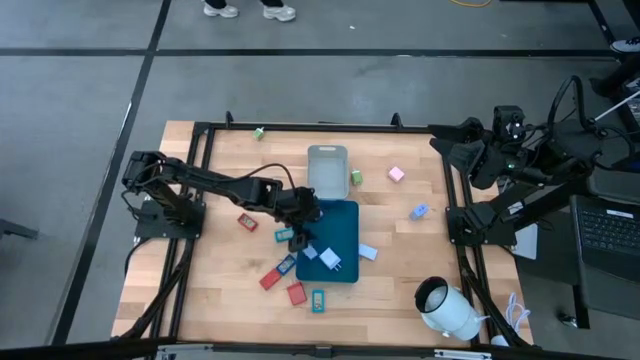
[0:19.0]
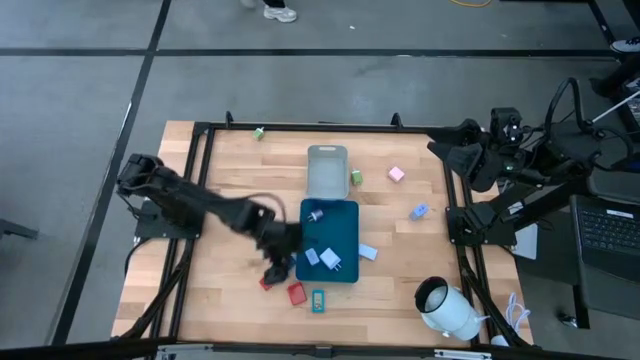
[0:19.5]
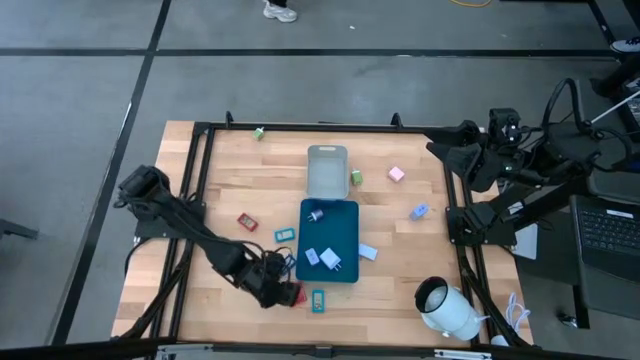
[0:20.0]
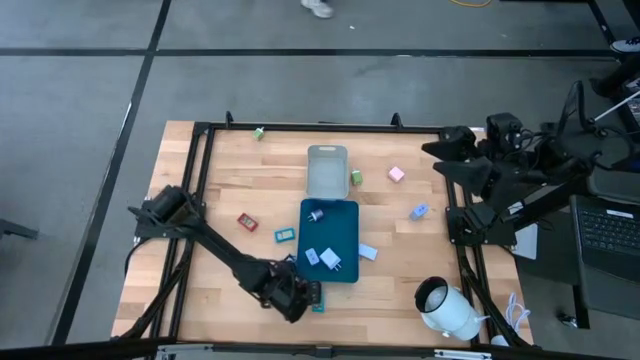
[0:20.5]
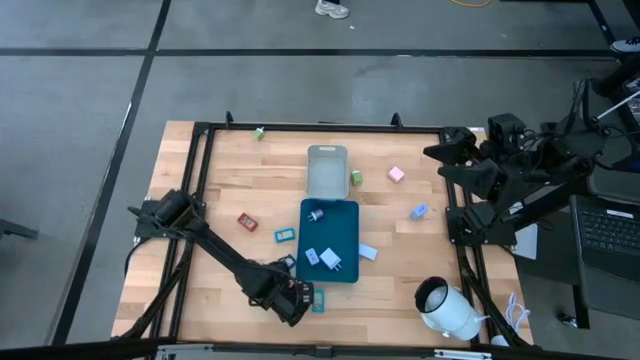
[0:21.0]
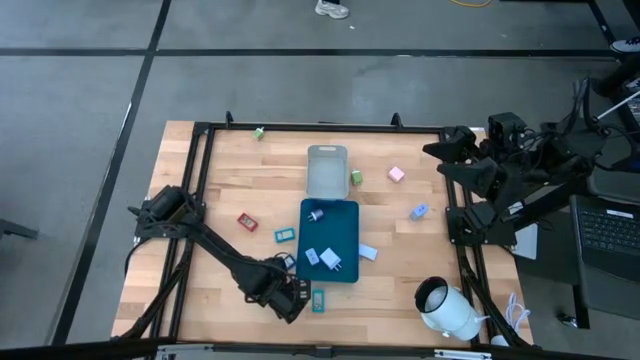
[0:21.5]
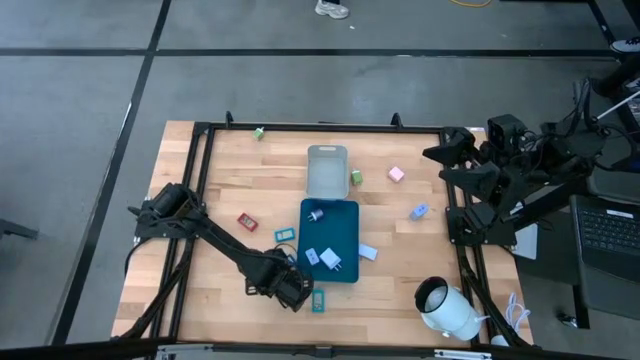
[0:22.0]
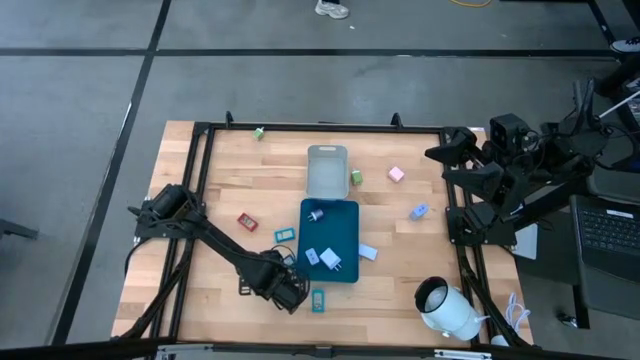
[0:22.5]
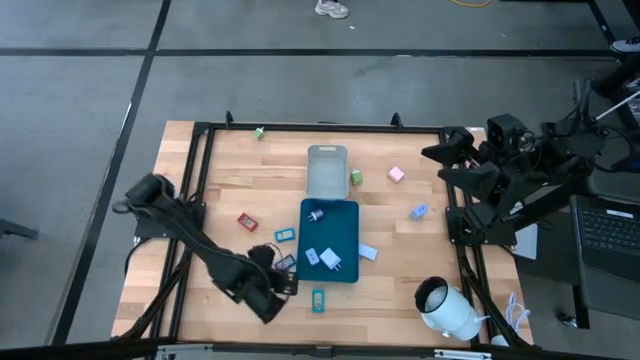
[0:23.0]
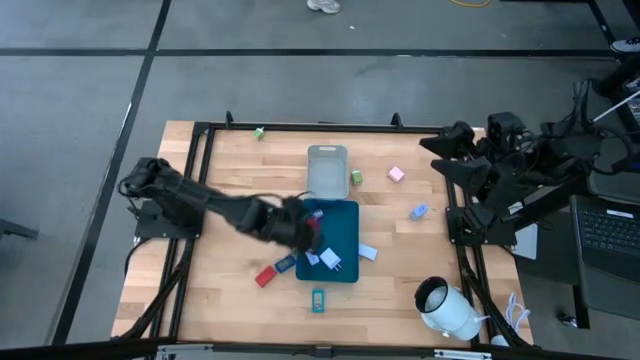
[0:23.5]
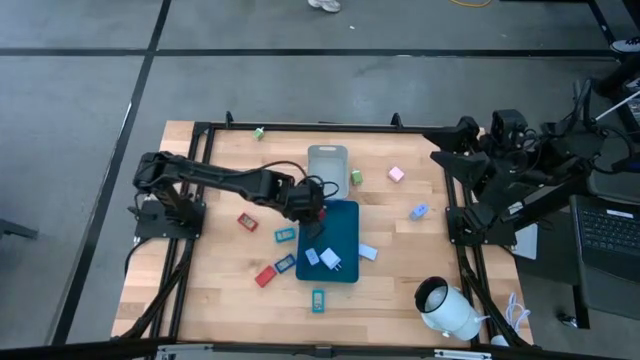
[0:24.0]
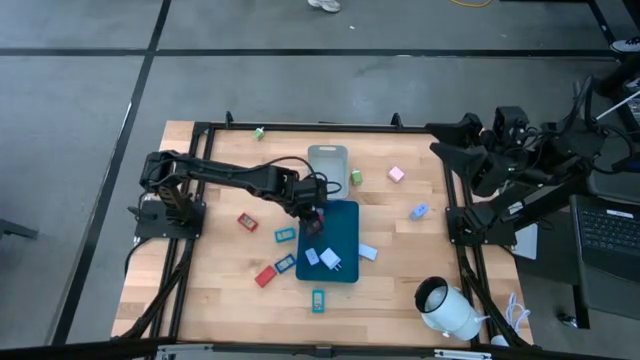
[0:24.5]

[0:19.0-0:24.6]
Task: Pick & Place Office items
Put the orange charger adapter into the blue bin

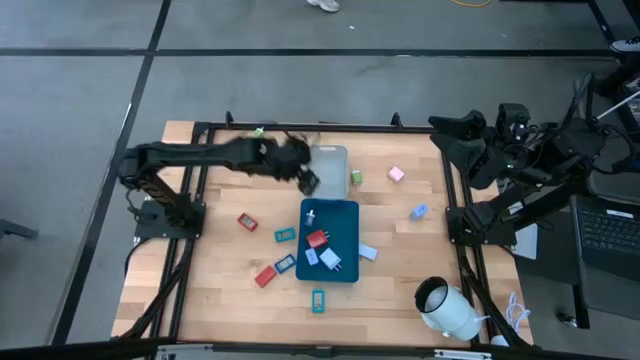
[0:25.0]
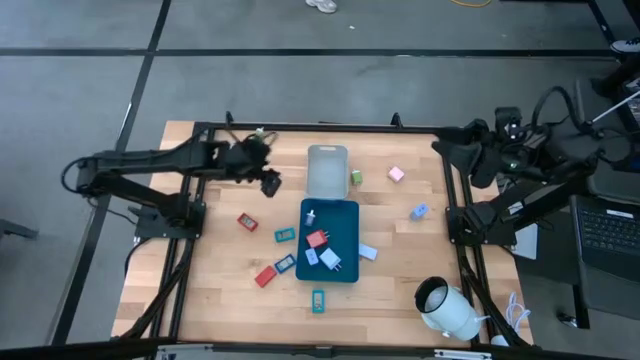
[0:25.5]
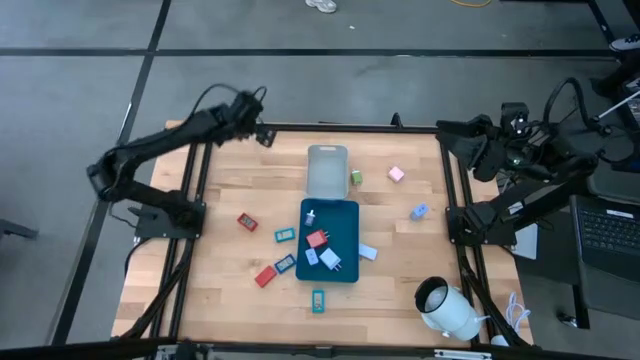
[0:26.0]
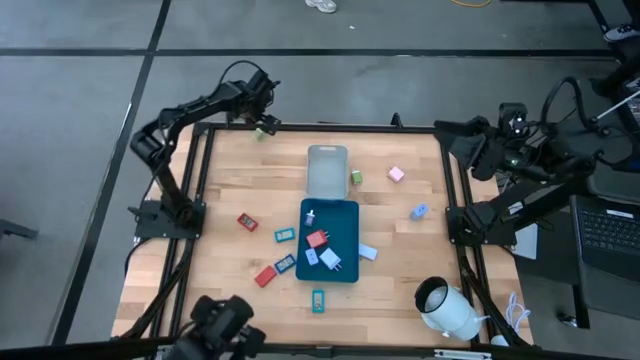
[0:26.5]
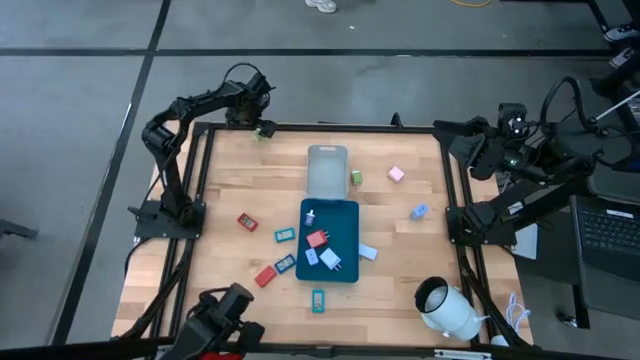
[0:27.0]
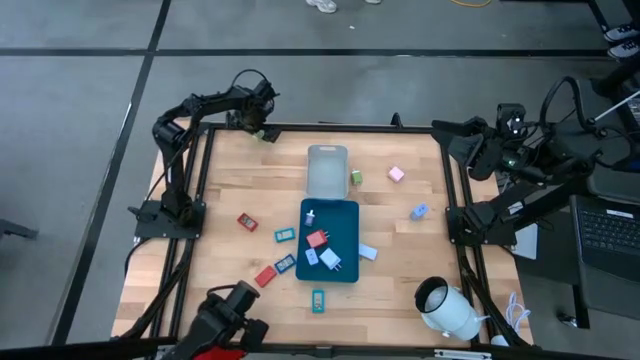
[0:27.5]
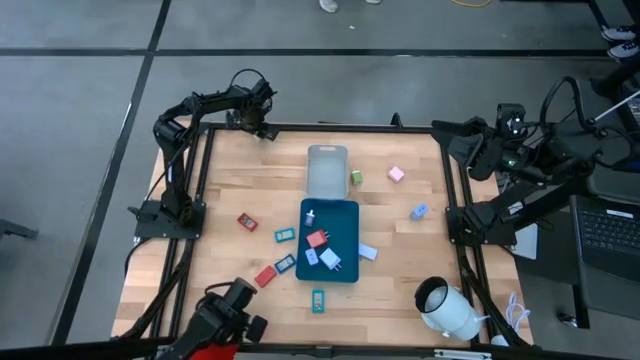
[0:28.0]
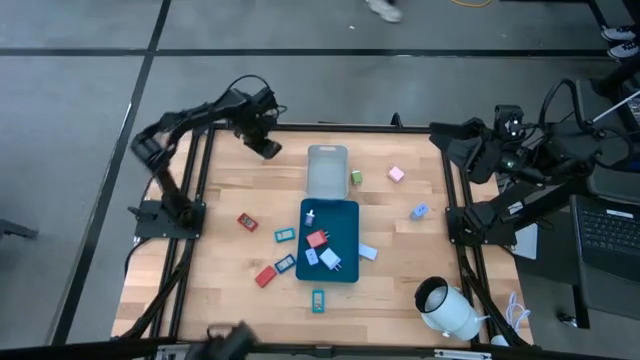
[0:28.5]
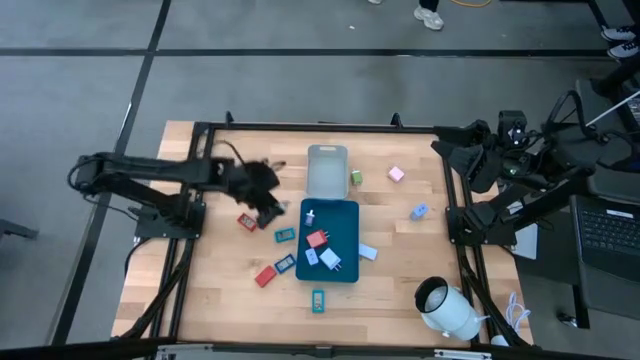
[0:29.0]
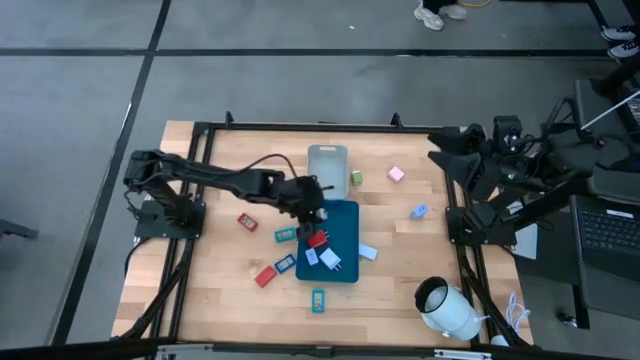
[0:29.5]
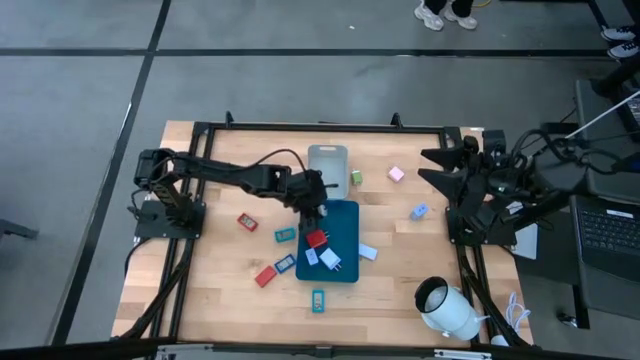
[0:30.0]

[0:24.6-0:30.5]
Put the green charger adapter into the blue bin

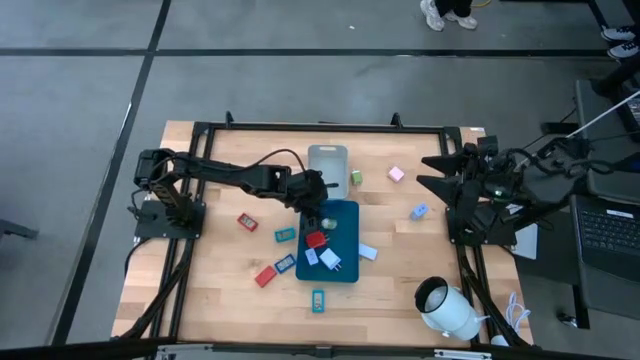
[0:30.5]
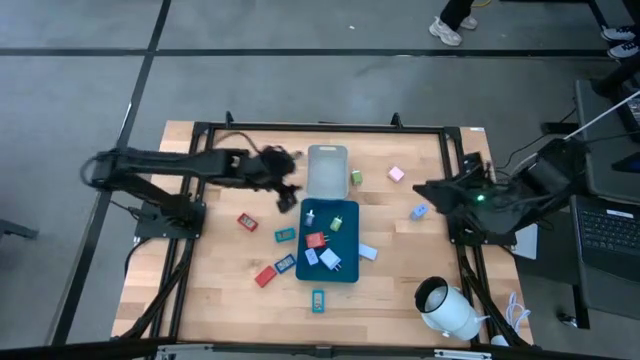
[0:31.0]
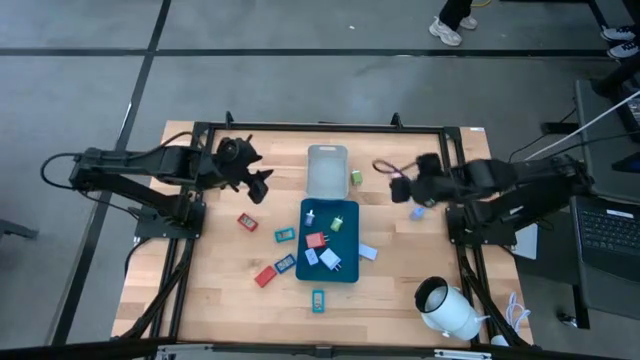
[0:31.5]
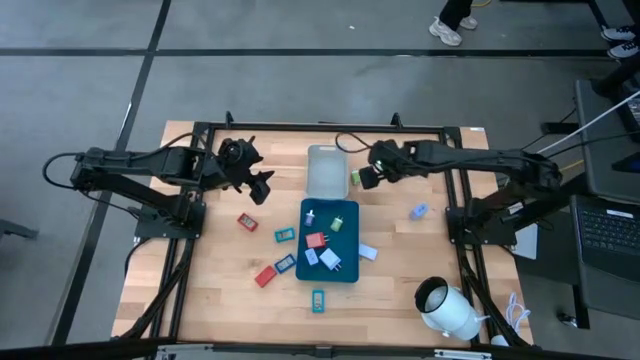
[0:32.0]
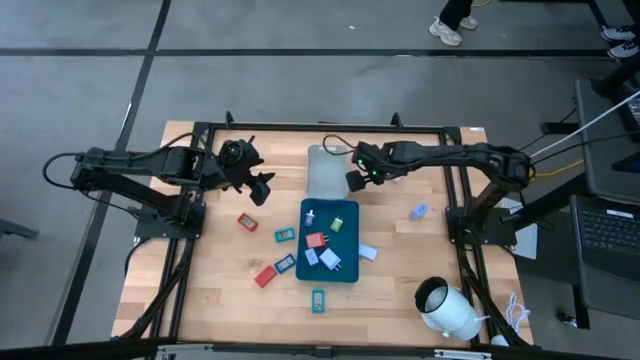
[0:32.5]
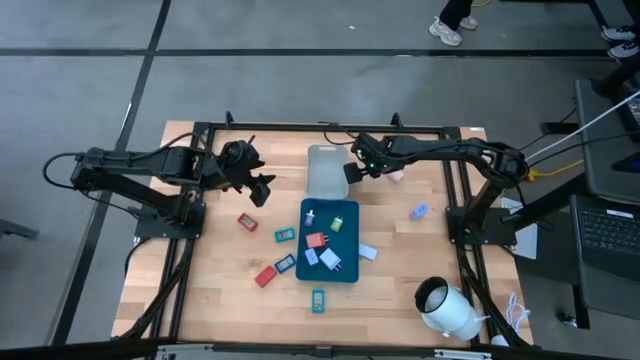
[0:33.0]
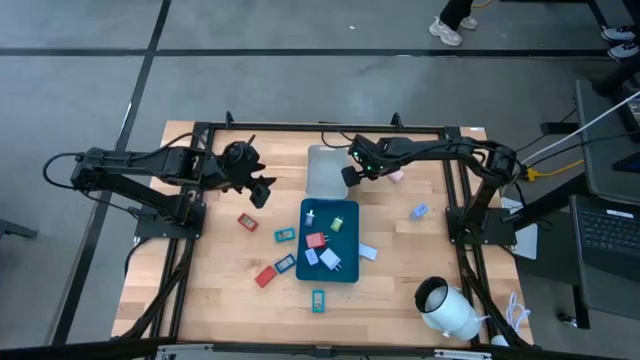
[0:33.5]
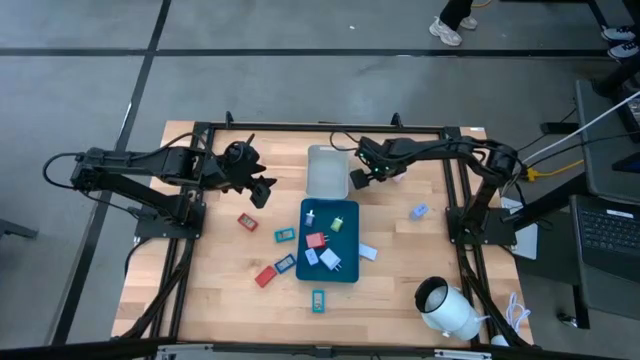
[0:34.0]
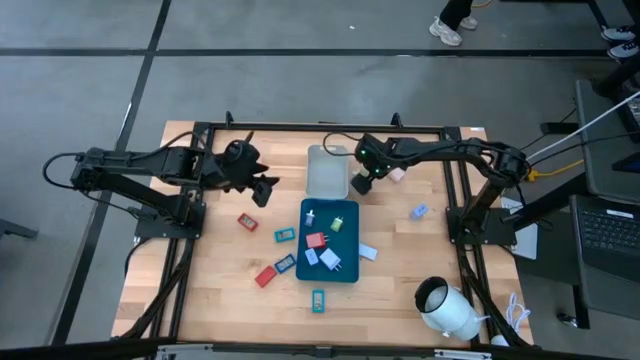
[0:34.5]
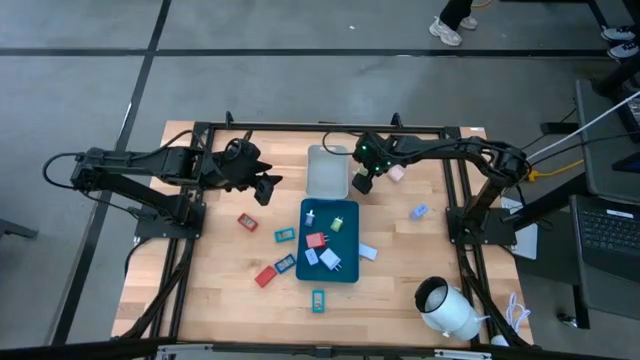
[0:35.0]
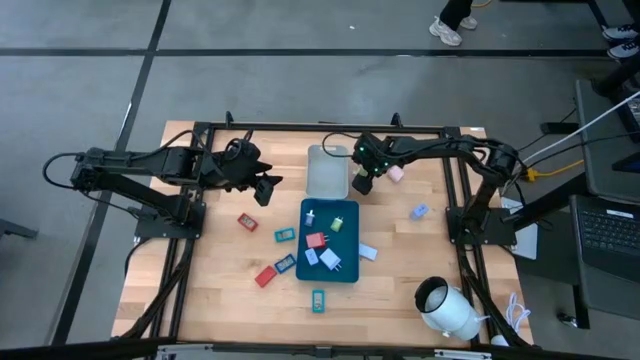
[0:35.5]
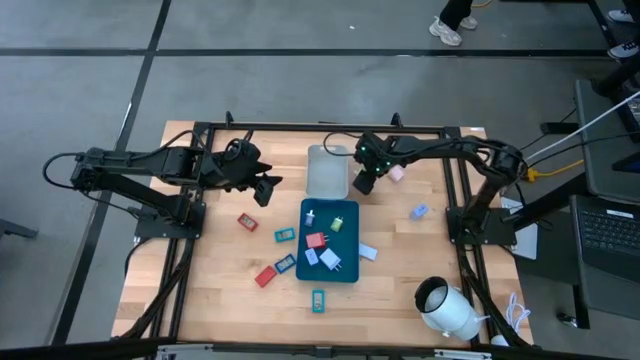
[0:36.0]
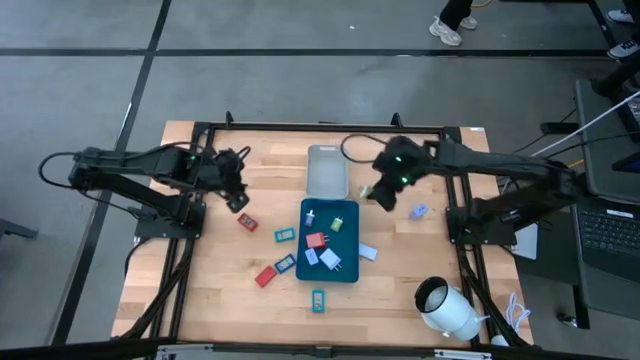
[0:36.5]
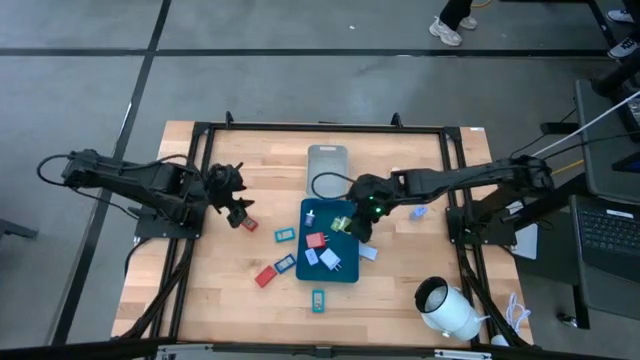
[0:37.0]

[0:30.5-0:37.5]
Put the green charger adapter into the blue bin

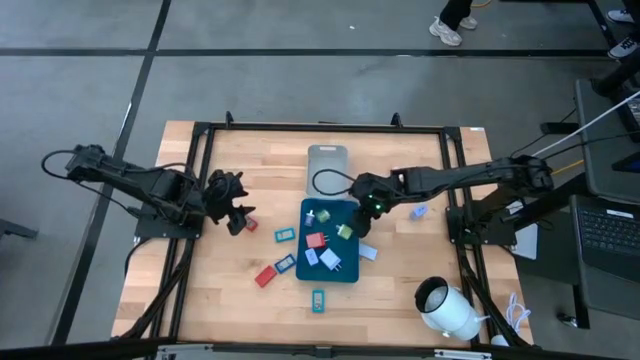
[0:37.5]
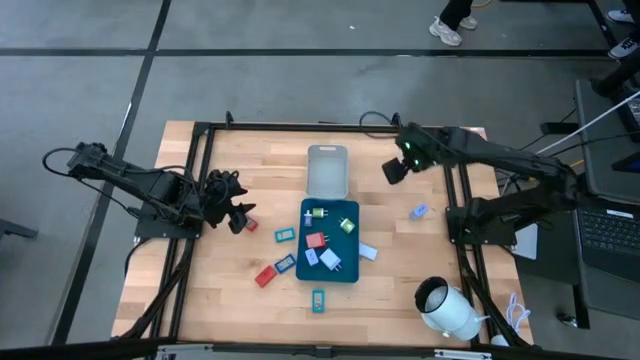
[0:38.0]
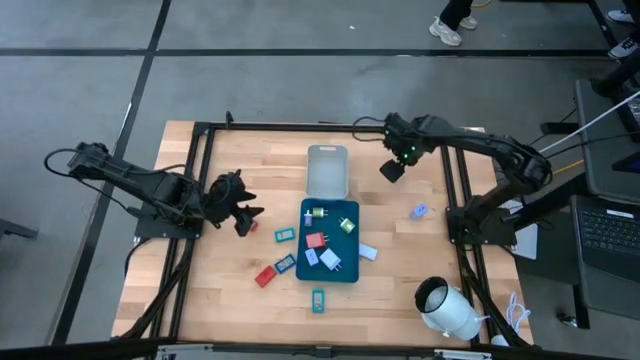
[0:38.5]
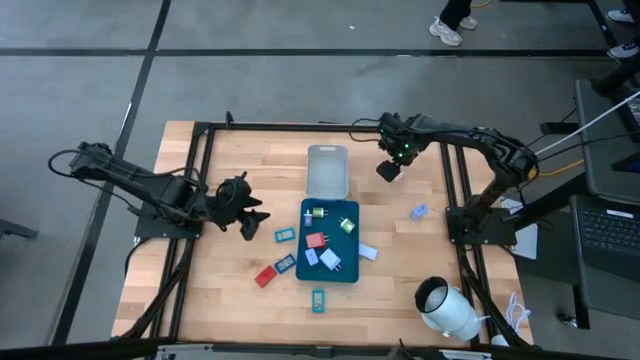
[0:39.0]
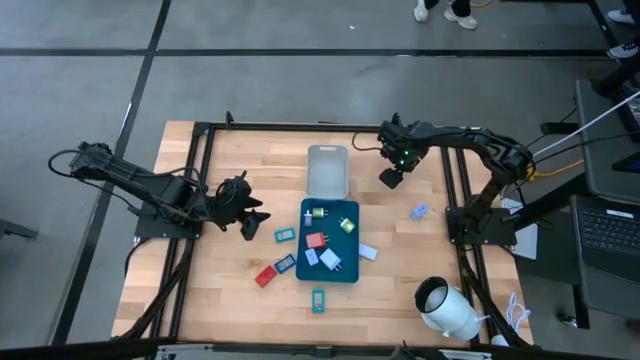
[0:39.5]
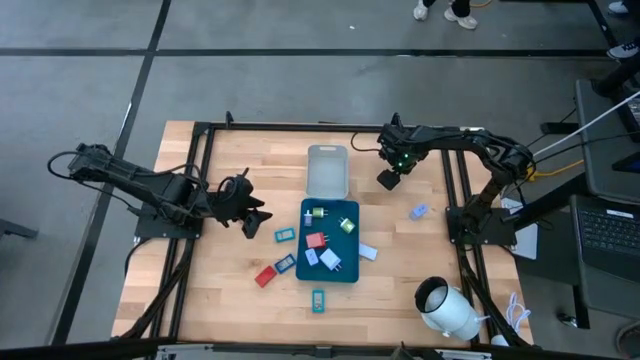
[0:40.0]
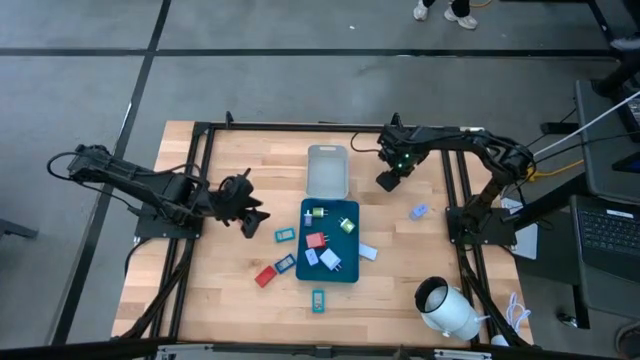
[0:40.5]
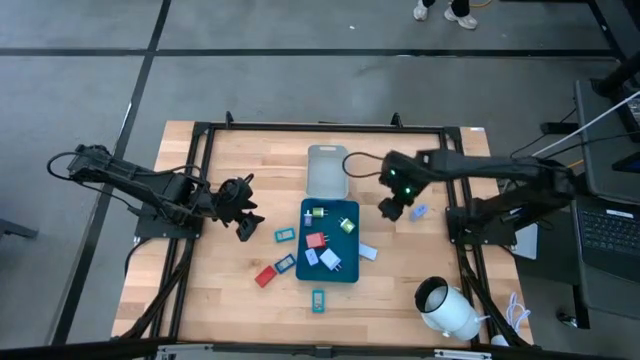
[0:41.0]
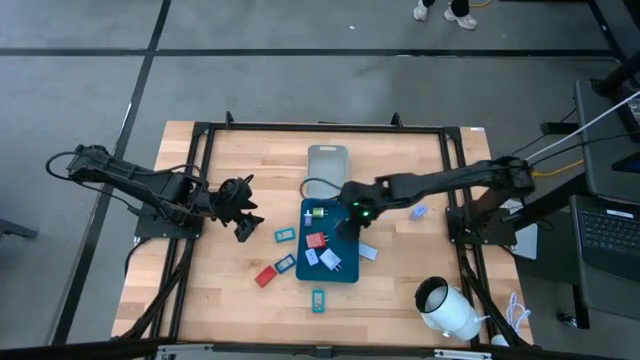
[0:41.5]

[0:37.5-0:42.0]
Put the pink charger adapter into the blue bin
